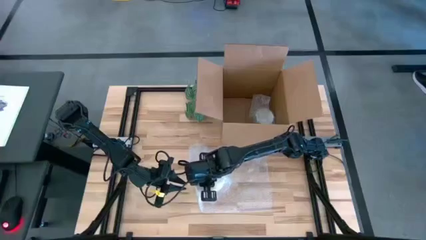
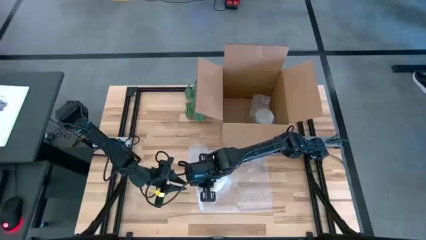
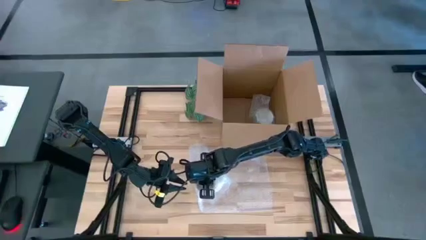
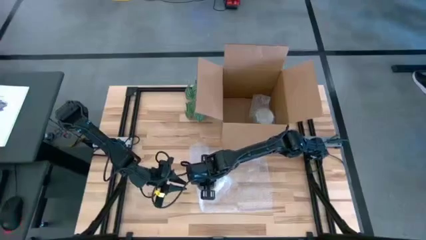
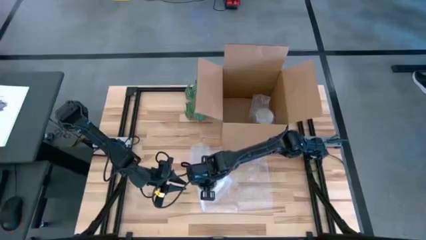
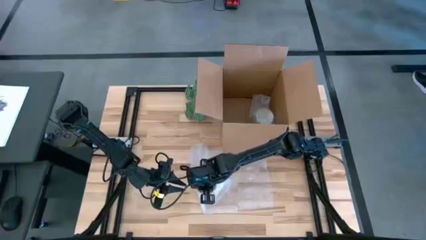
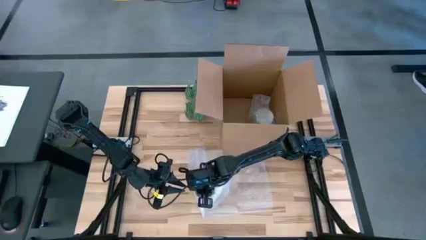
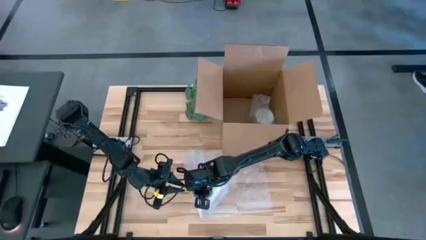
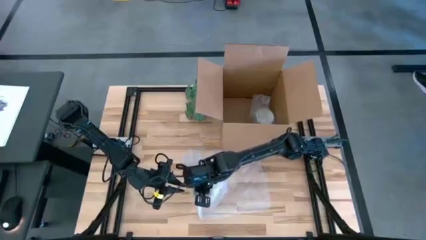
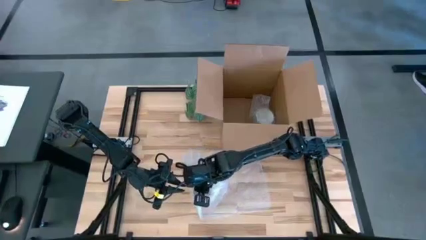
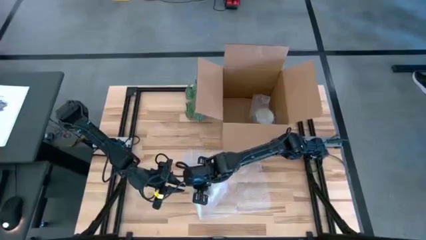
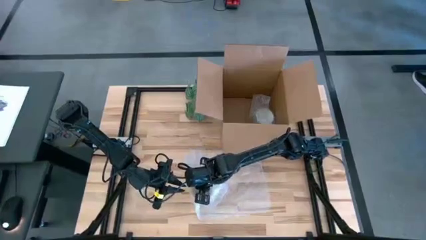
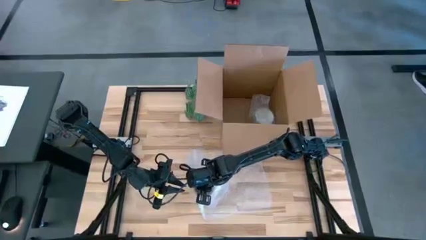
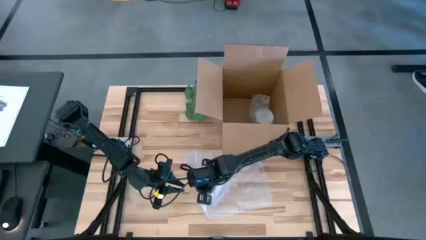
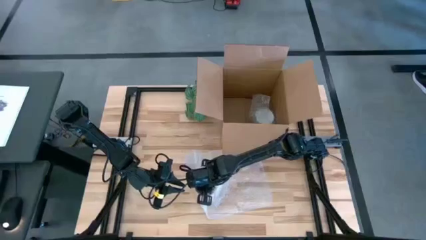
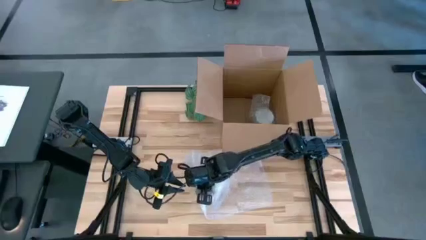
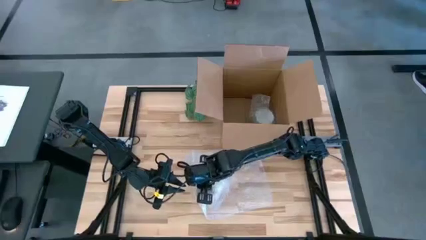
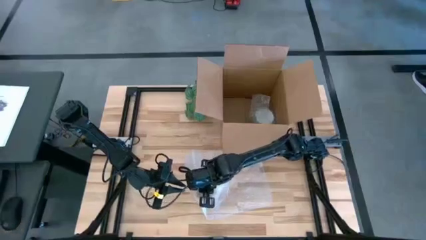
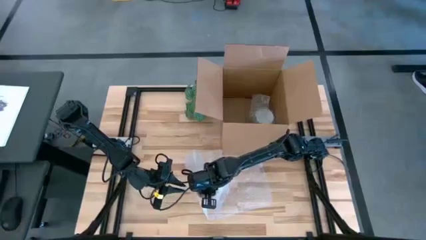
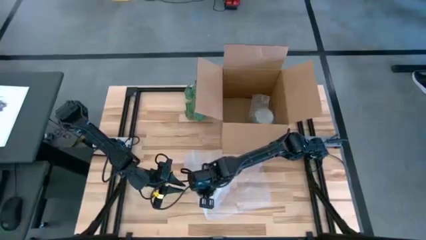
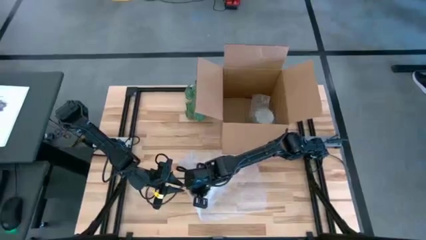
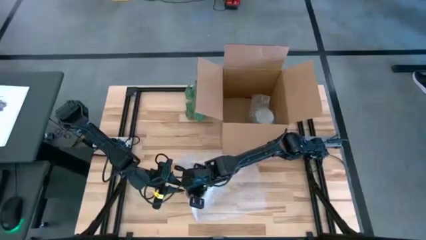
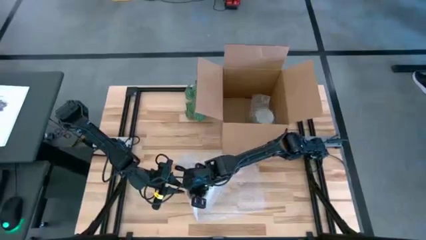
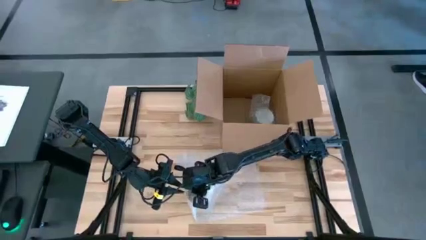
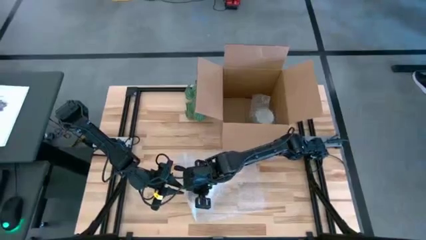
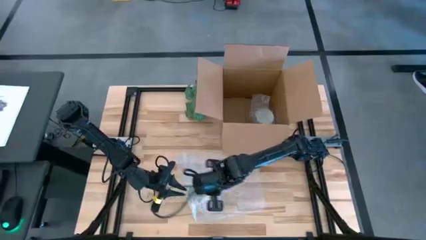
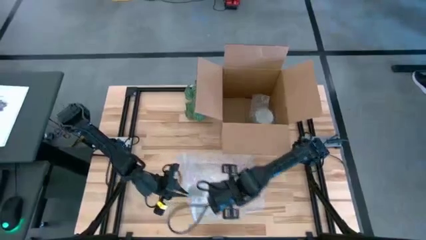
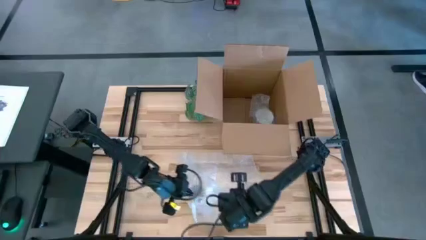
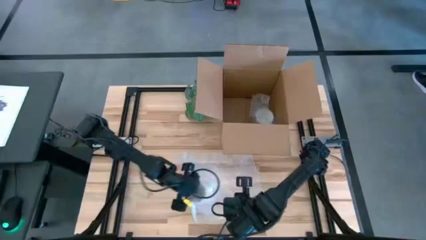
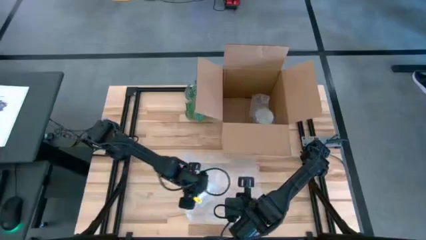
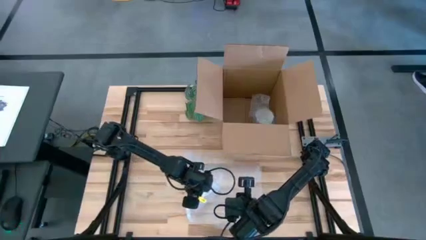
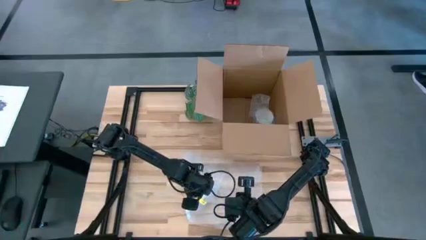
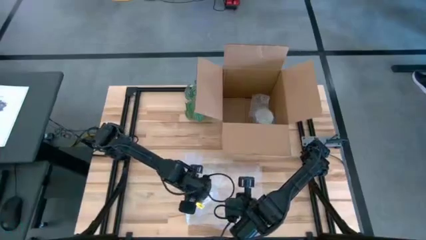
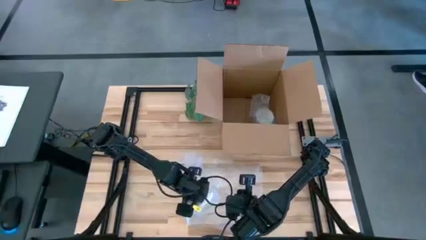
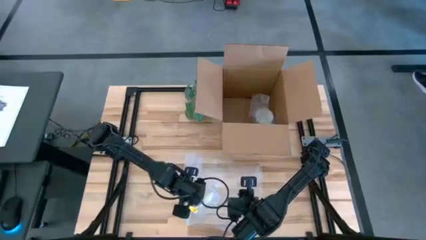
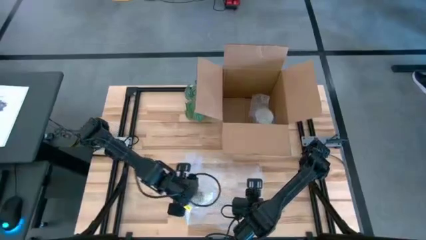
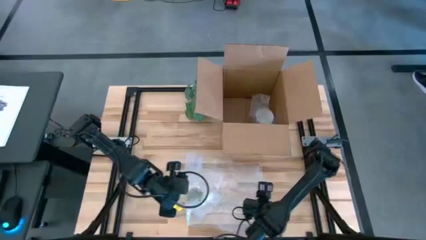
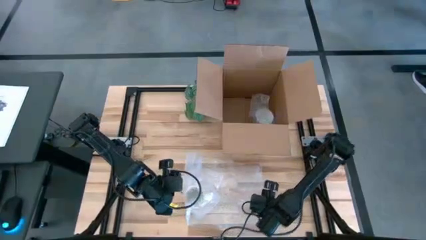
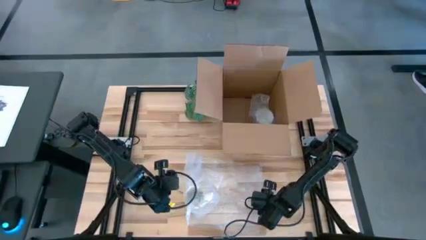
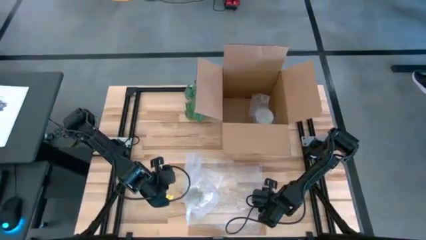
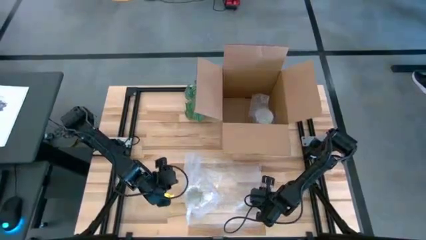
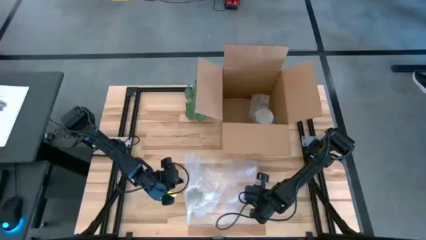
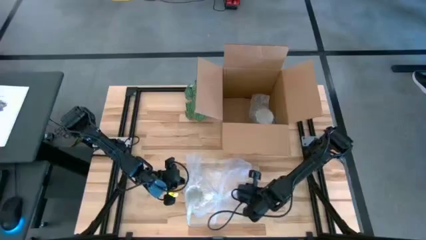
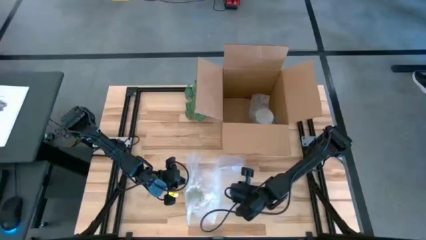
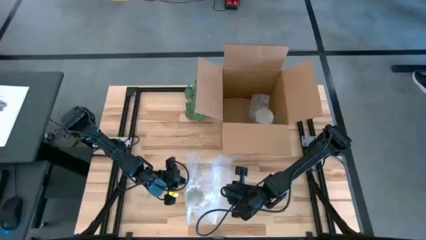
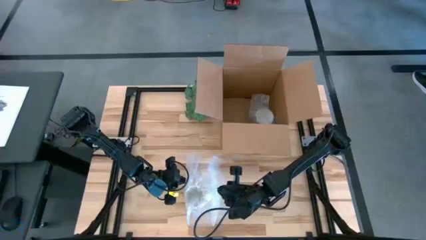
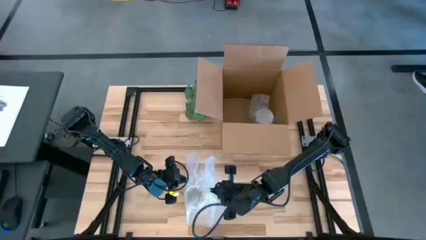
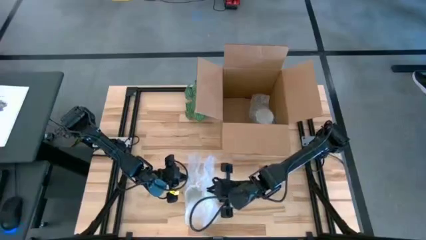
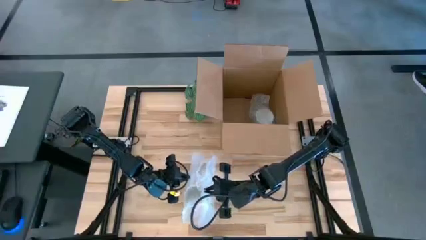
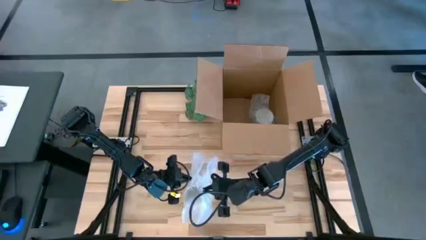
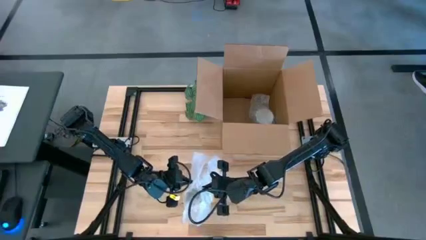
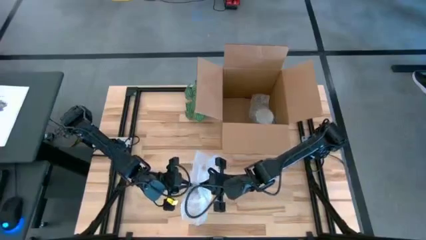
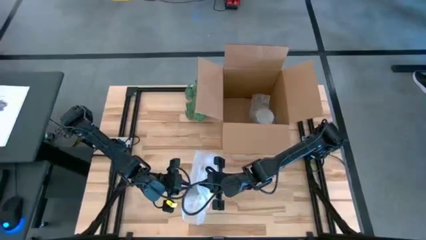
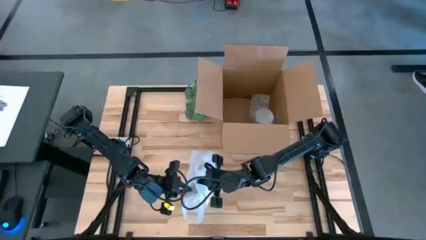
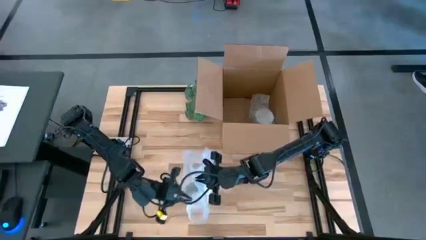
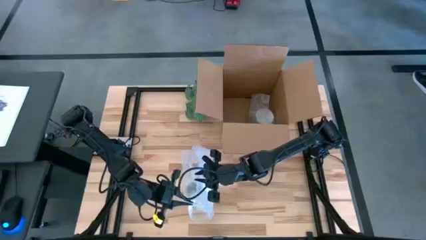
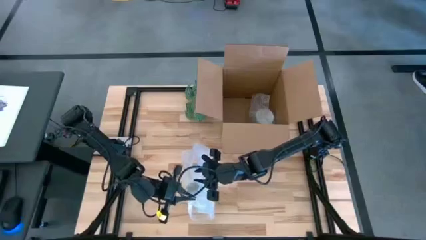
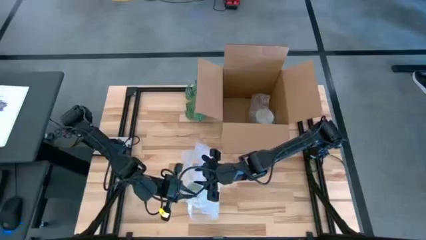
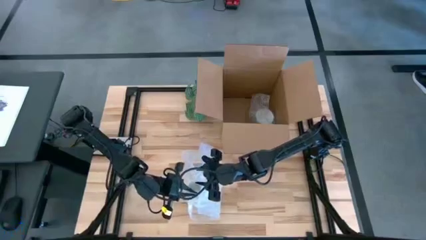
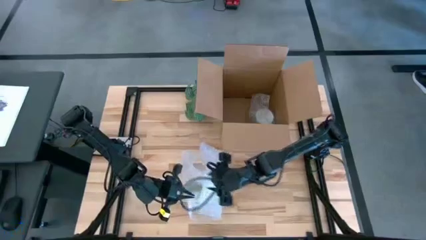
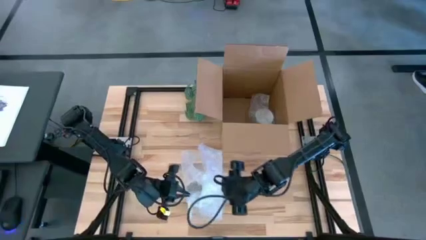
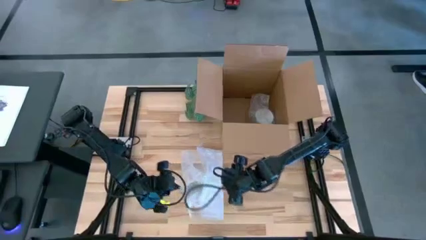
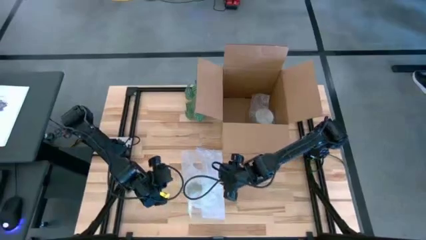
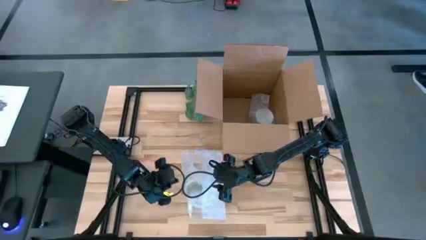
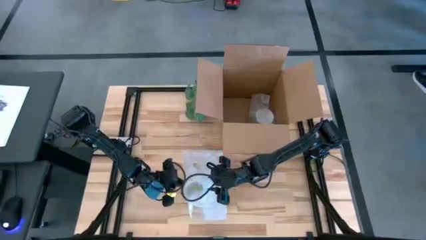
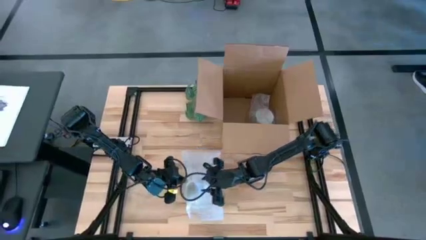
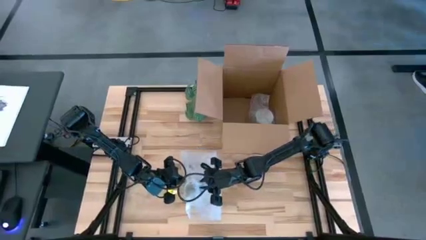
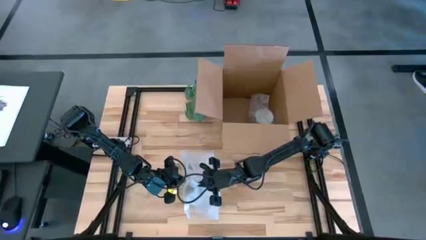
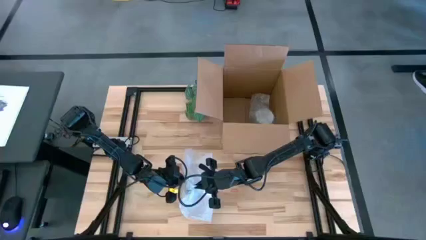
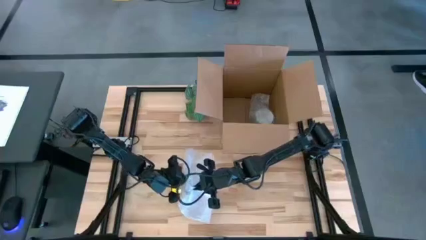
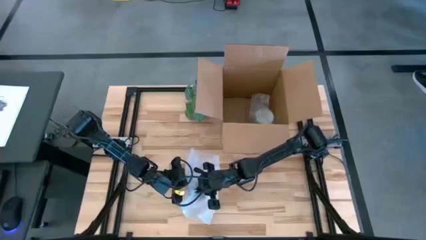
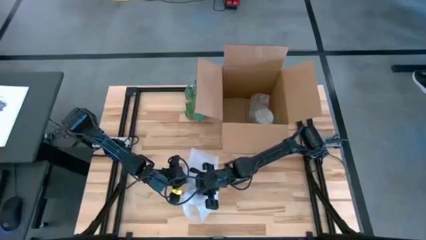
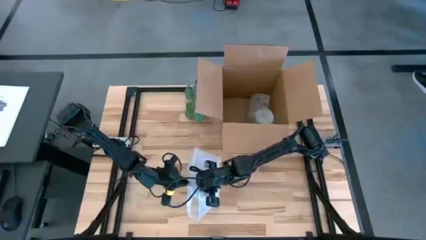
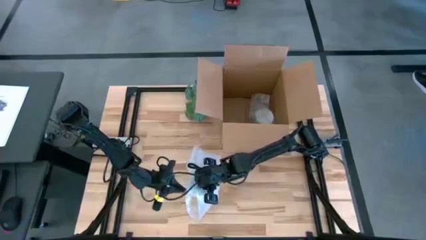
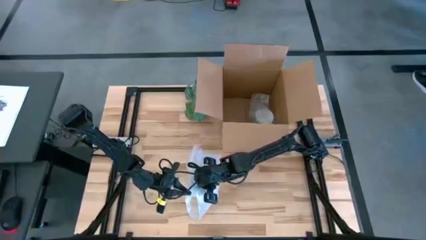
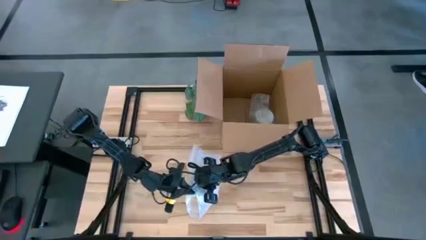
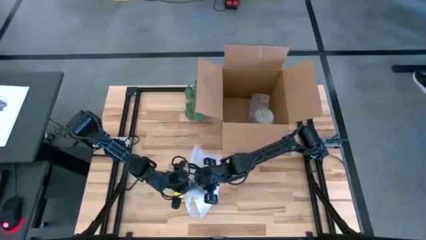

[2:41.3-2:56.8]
Task: wrap mug
Wrap the orange cup with the bubble wrap

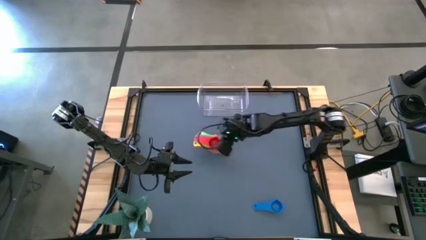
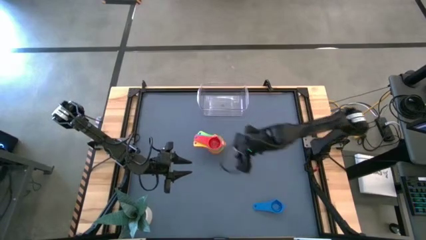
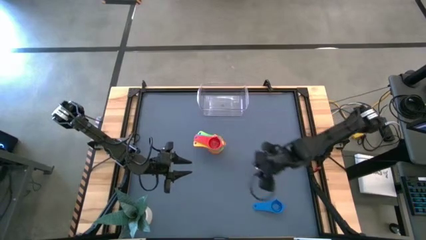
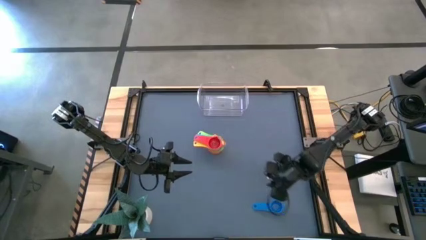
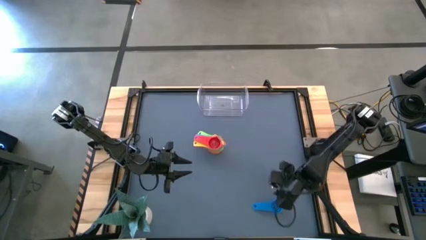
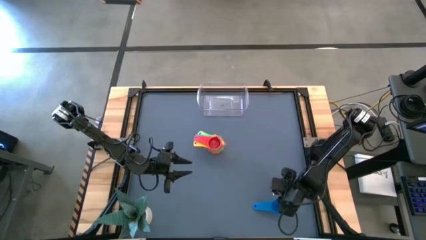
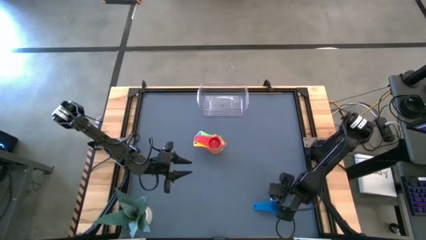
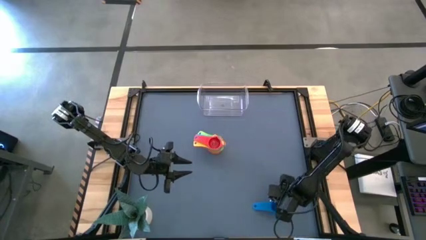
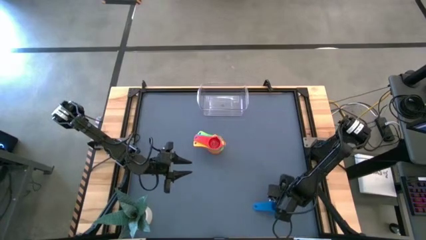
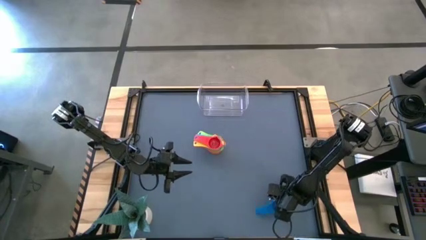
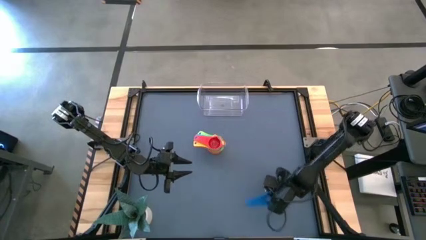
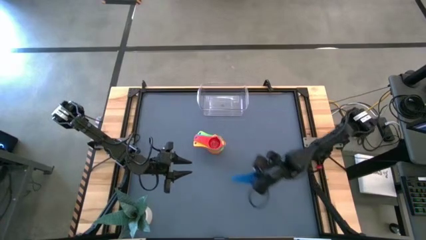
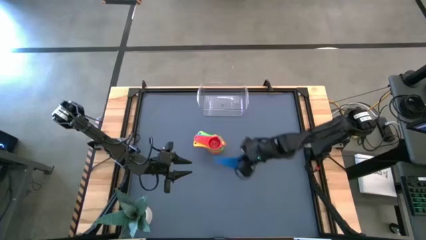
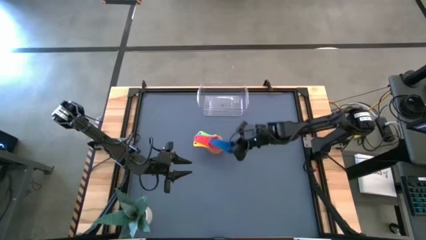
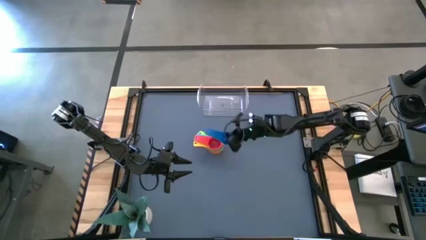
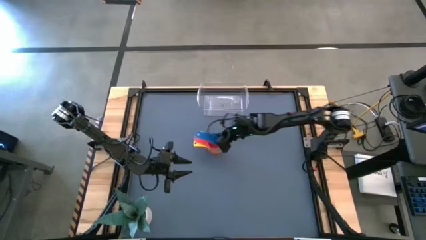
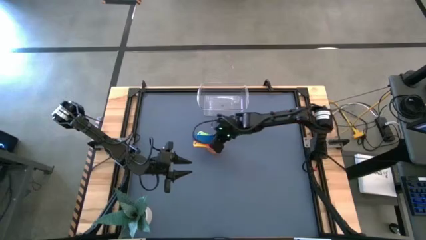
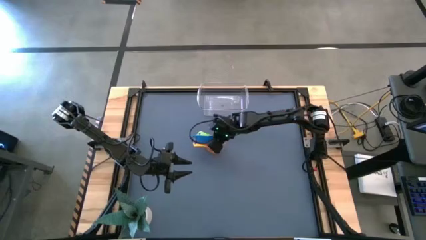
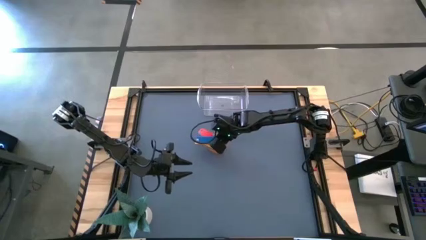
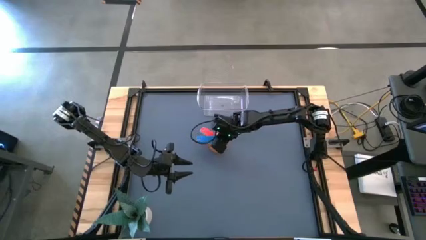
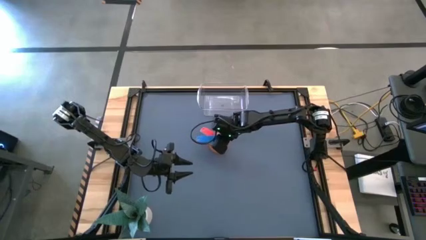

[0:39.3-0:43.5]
Task: Nest measuring cups in basket
Stack the blue measuring cup on top of the red measuring cup
